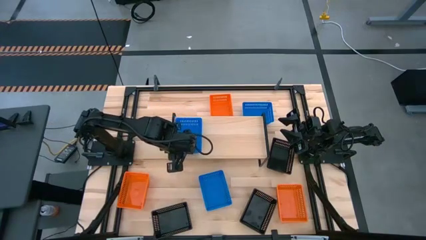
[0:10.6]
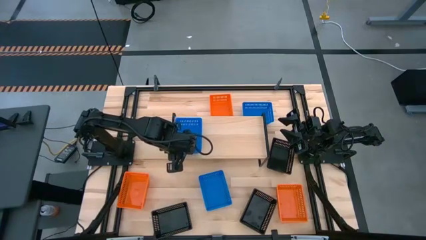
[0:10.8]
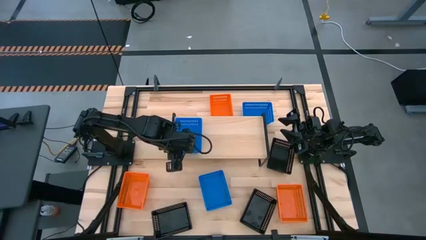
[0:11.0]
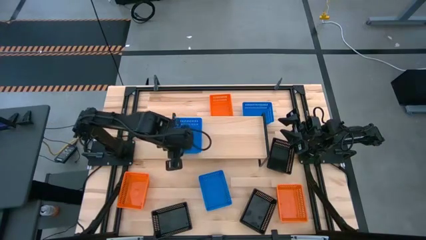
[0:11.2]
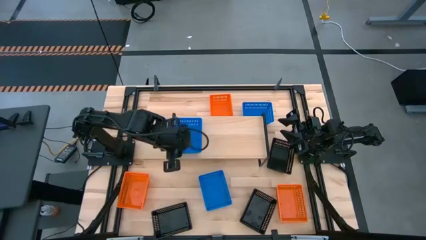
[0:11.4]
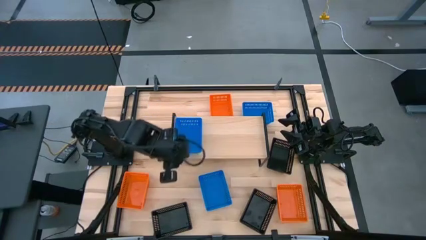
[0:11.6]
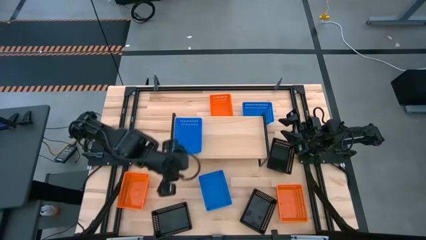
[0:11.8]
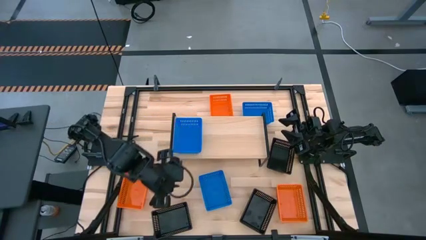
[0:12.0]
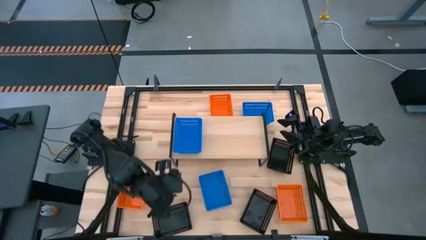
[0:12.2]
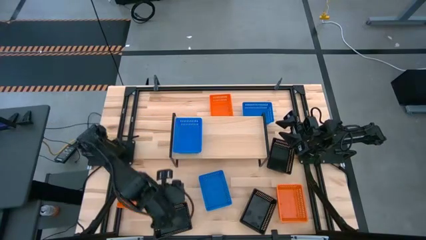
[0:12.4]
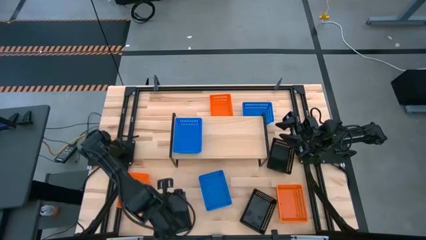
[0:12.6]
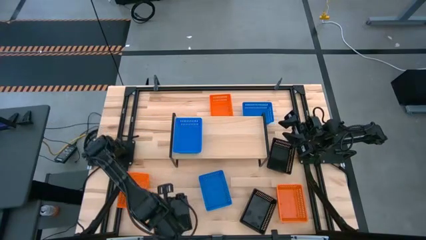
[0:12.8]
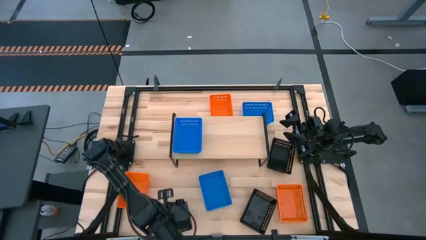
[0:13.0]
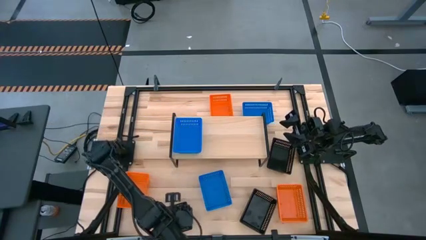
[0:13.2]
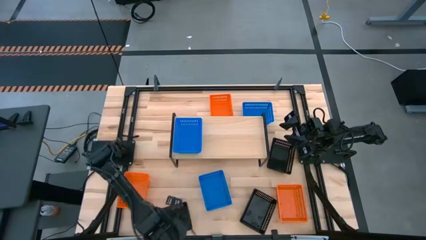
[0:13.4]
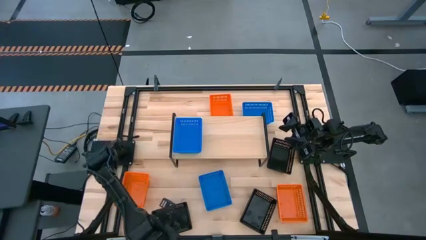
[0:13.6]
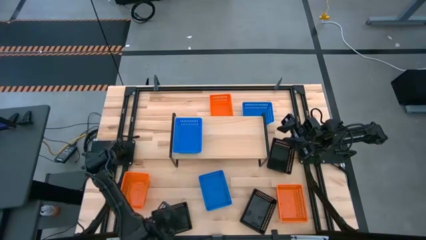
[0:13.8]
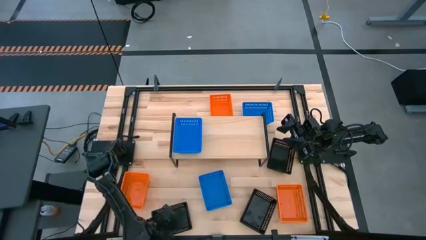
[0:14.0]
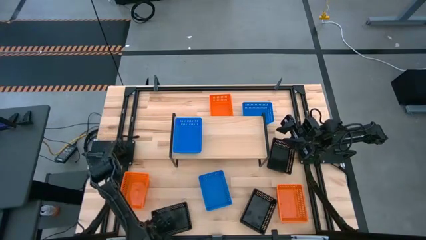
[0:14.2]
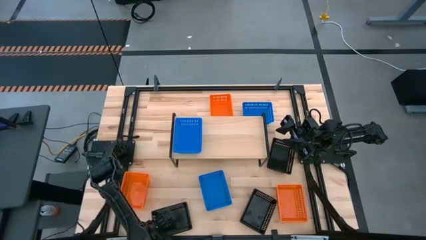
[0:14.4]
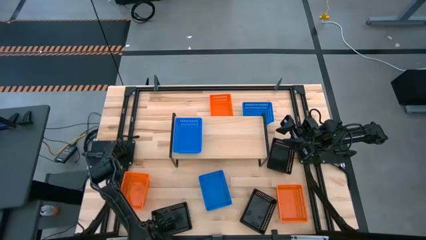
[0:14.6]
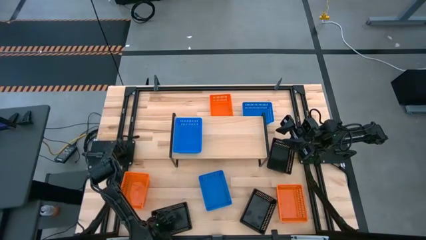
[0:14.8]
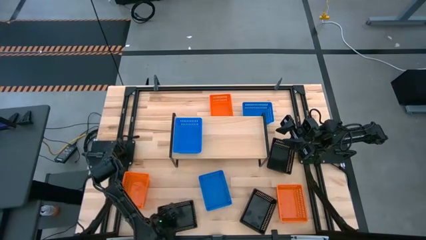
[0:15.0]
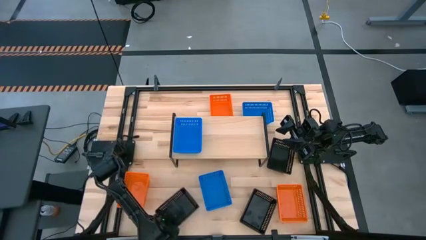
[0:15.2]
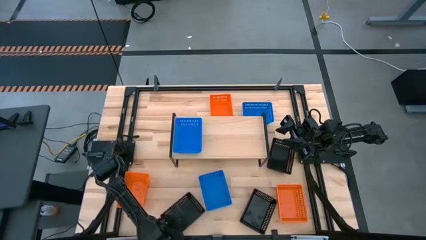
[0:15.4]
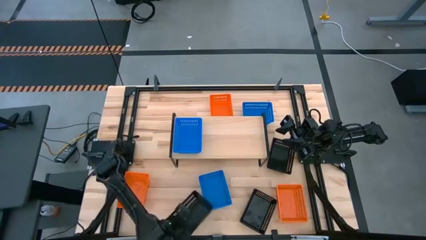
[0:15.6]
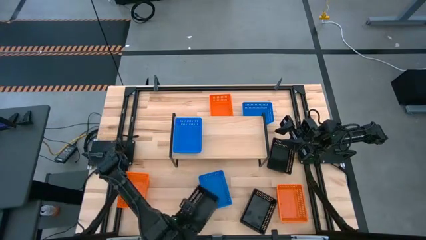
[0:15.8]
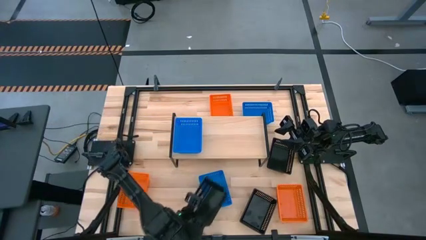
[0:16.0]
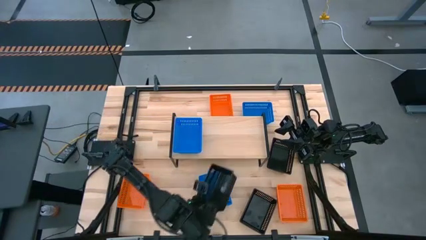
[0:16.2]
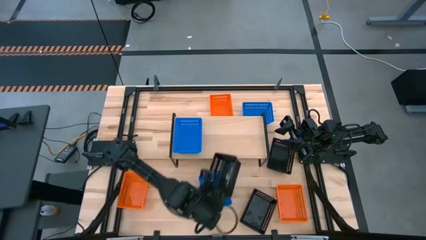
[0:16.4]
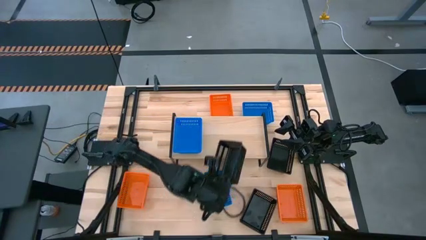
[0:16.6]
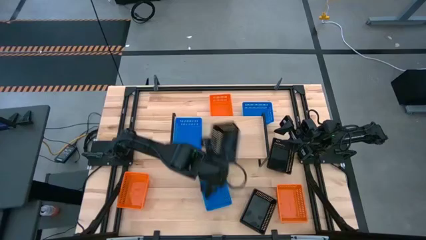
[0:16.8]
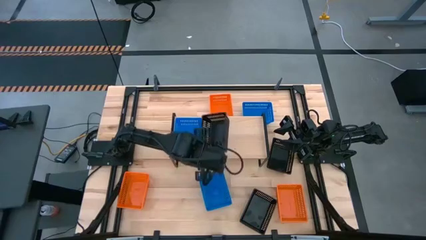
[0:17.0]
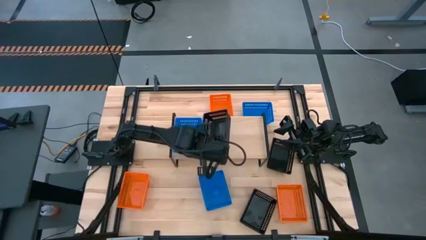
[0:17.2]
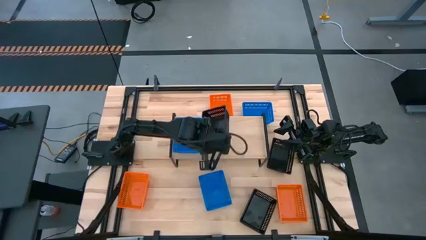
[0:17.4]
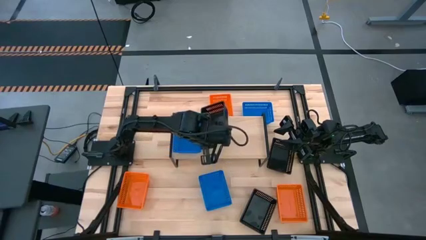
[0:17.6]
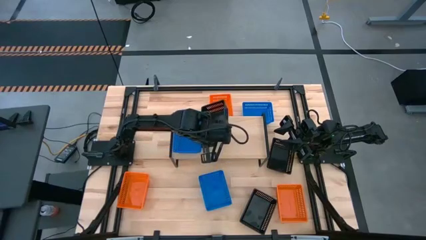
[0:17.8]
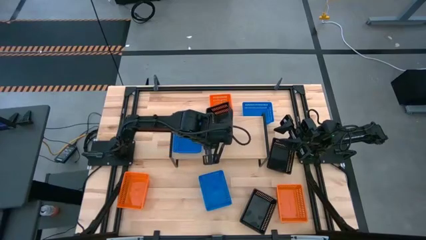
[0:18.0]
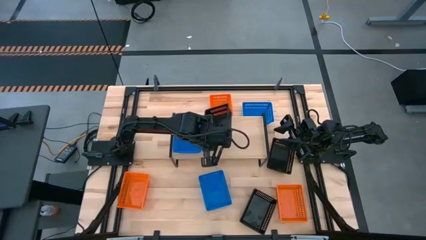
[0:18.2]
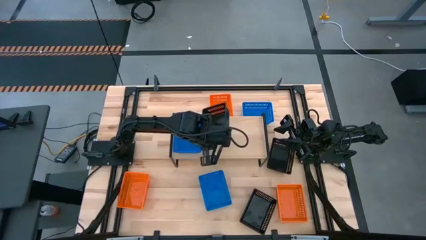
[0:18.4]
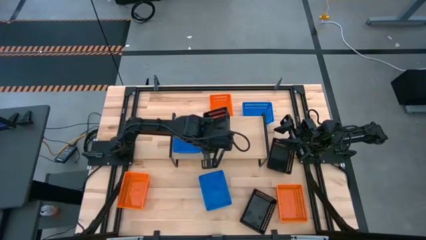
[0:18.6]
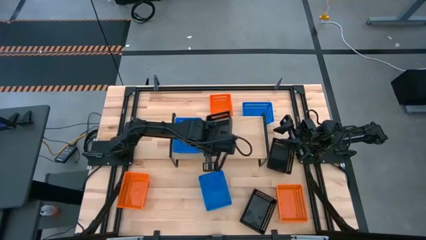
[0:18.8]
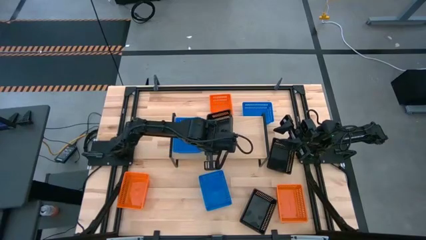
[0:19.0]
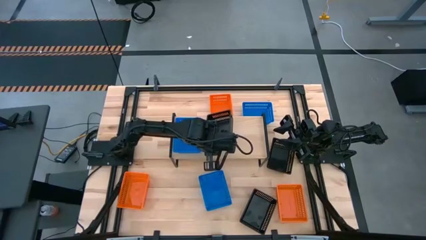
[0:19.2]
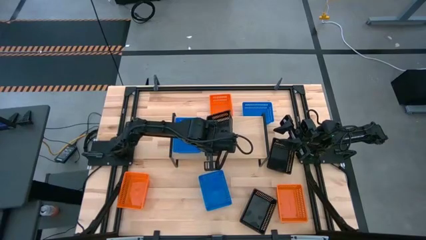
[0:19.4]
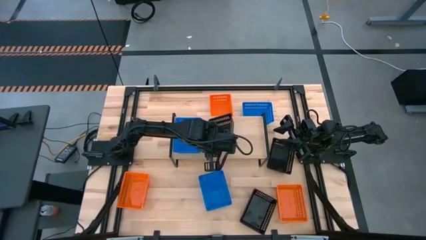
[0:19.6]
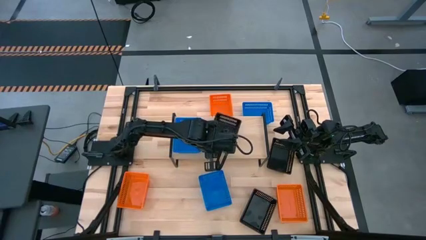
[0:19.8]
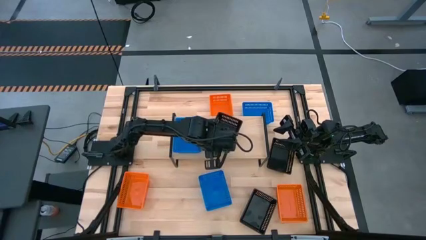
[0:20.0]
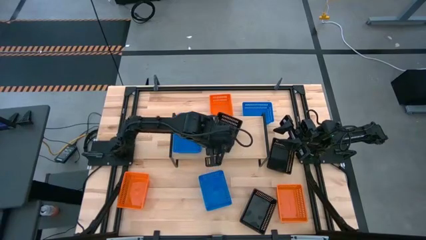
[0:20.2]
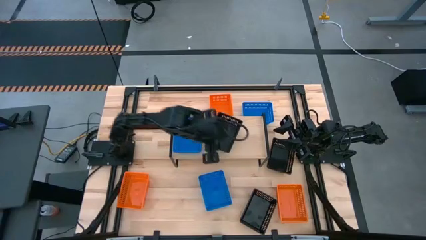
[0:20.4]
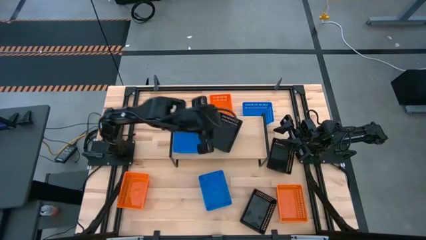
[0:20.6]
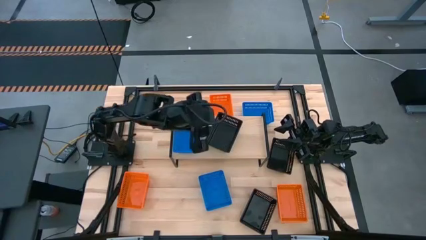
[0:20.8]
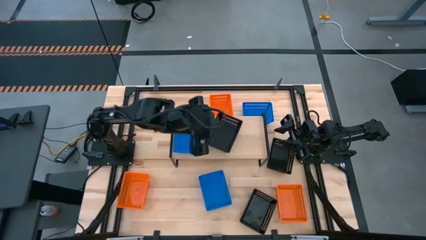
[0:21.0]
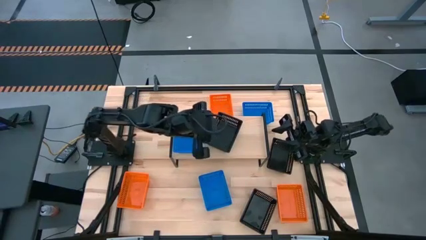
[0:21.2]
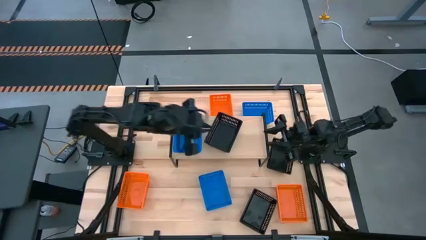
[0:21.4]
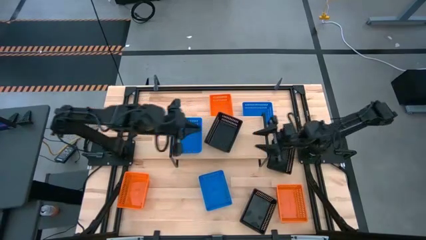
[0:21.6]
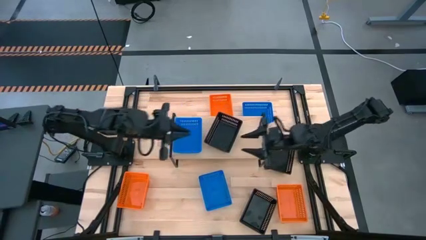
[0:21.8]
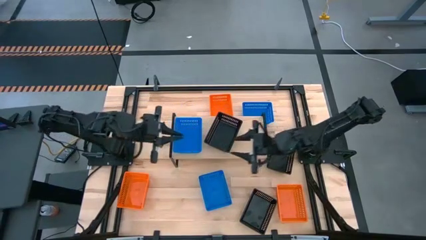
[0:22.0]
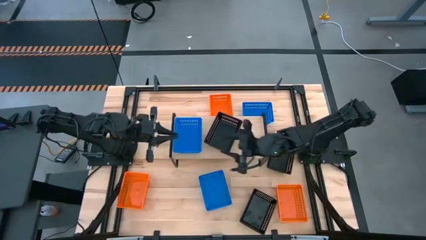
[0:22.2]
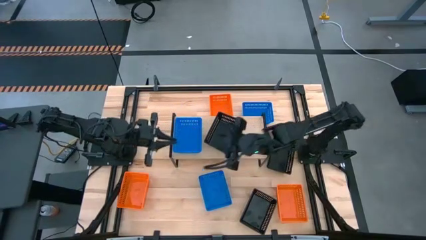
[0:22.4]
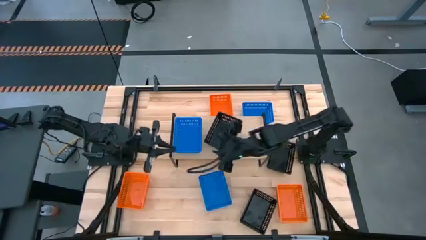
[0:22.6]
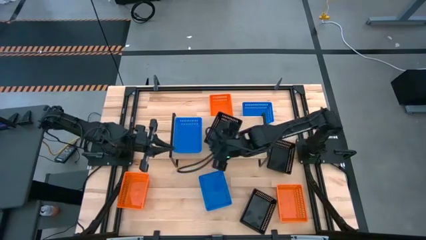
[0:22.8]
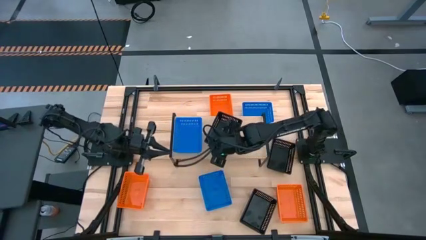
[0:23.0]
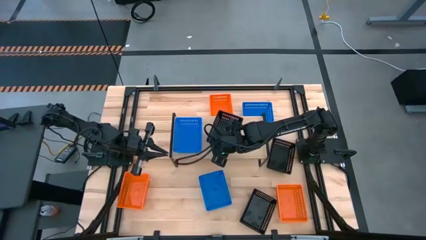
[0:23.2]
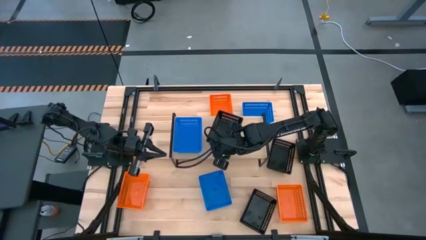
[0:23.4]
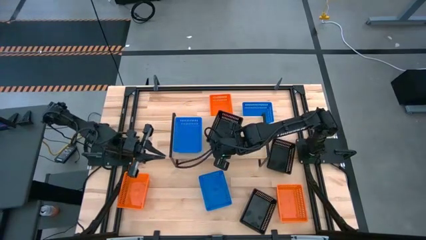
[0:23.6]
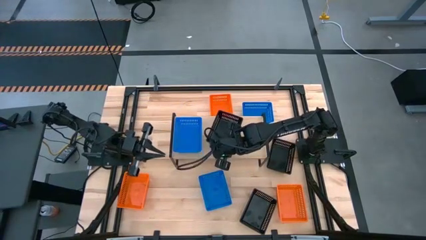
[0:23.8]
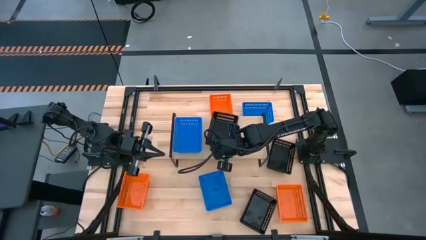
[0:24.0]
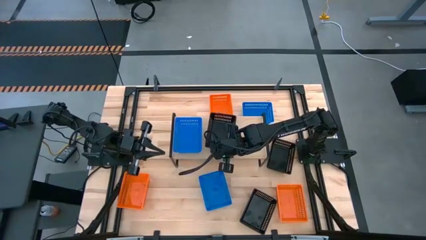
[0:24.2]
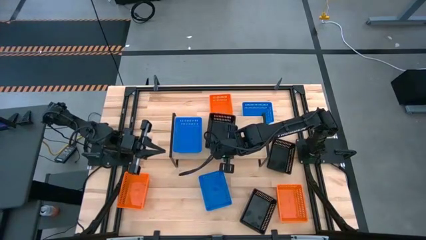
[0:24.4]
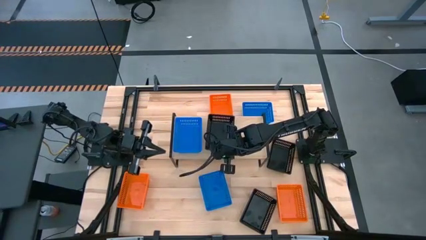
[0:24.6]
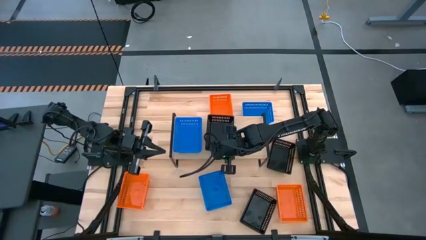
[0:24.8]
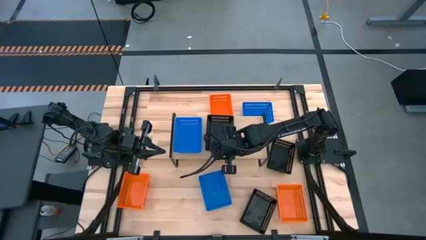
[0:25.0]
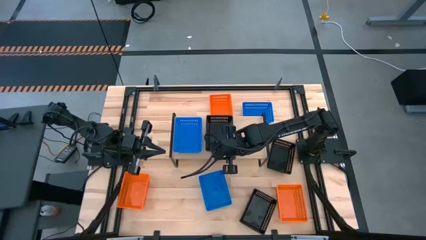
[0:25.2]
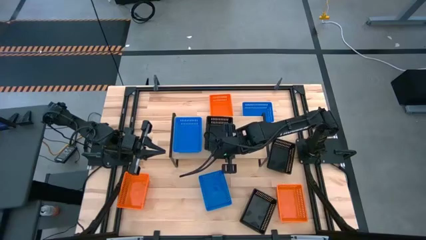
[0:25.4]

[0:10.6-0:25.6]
Task: Stack baskets on shelf by color
Put the bottom left black basket on the shelf
